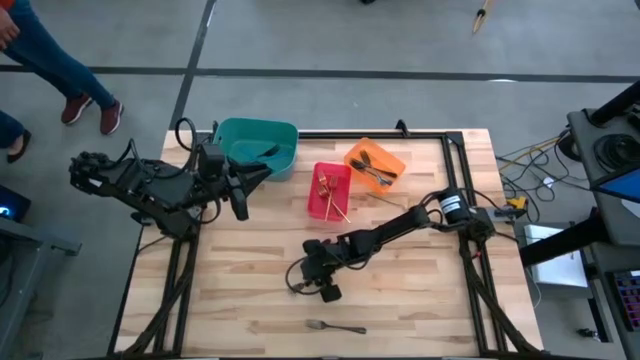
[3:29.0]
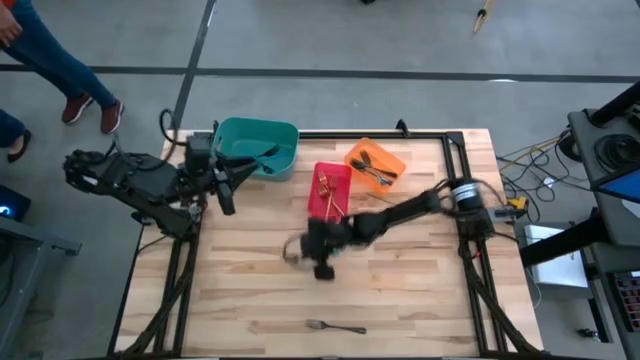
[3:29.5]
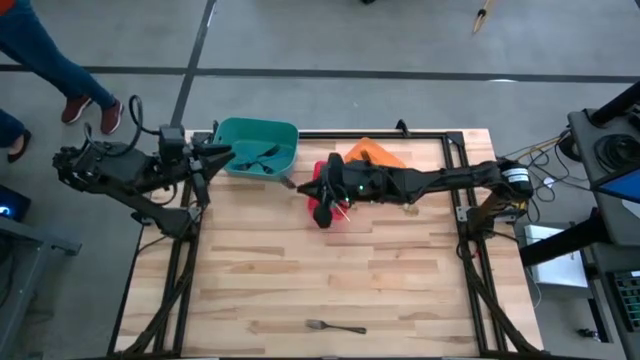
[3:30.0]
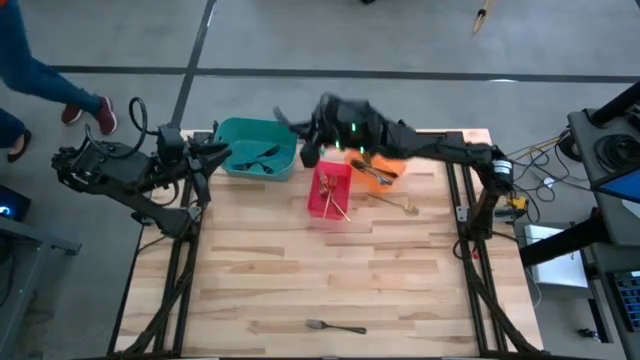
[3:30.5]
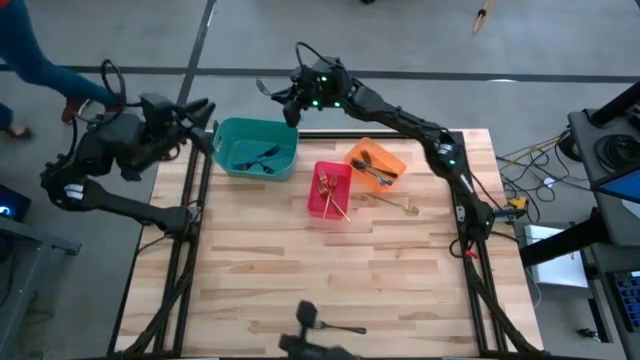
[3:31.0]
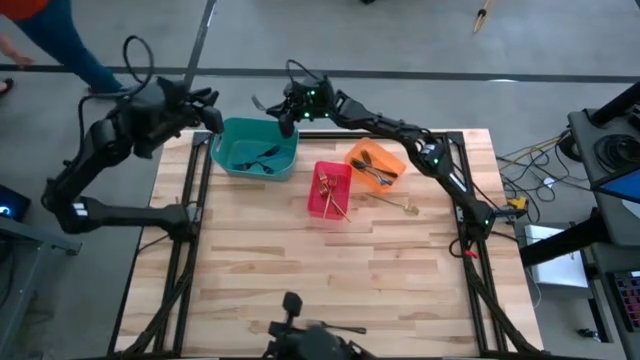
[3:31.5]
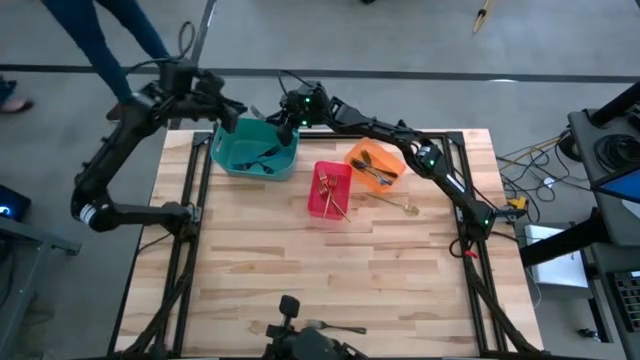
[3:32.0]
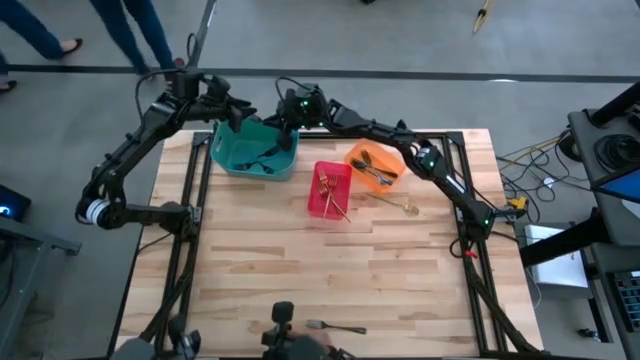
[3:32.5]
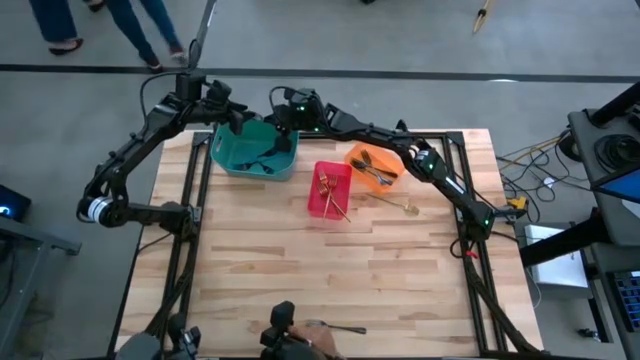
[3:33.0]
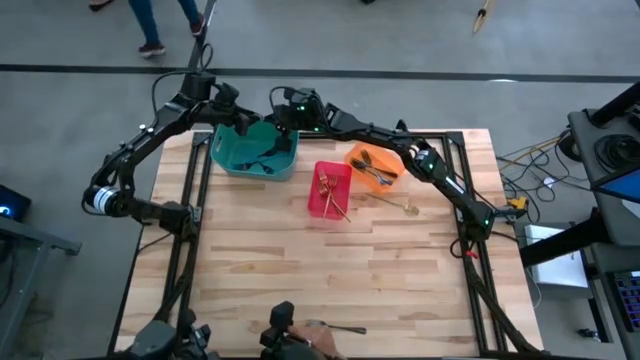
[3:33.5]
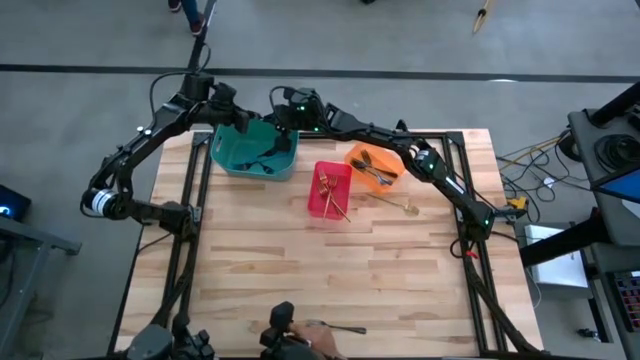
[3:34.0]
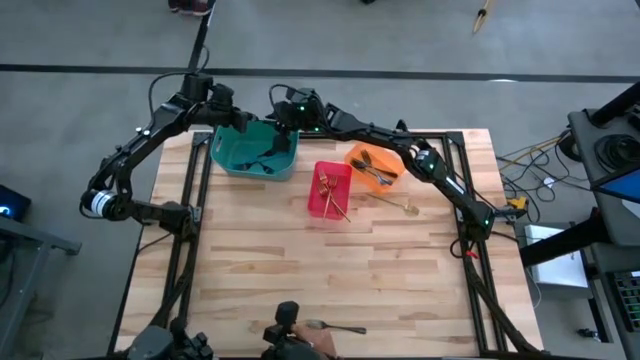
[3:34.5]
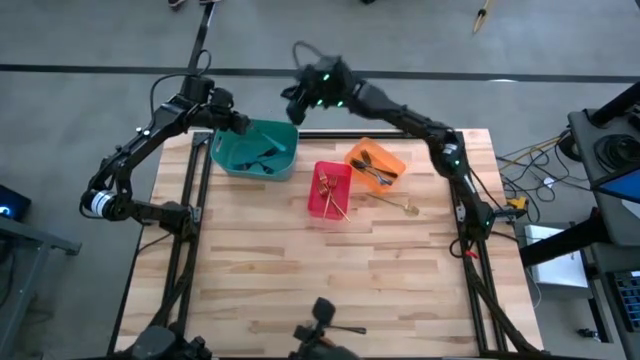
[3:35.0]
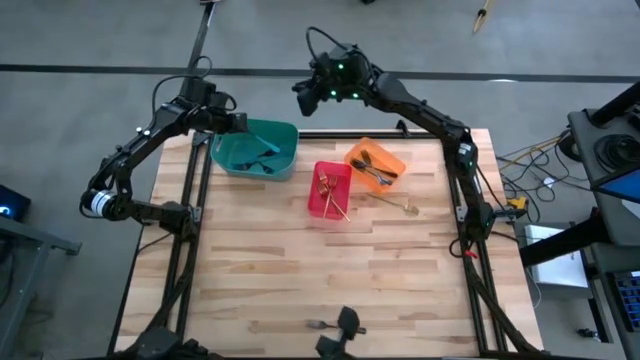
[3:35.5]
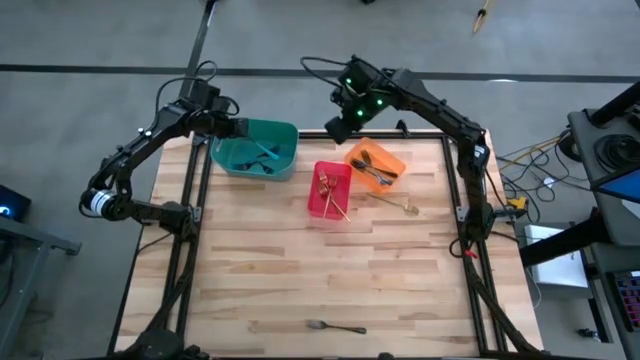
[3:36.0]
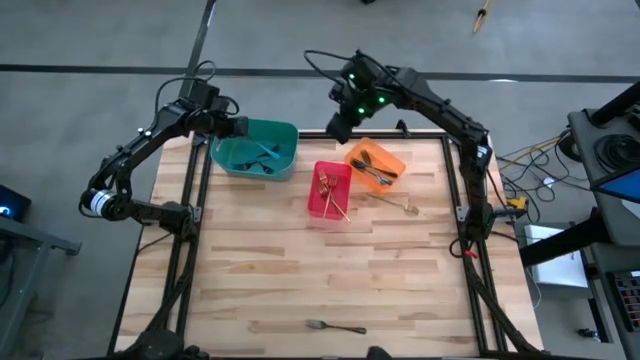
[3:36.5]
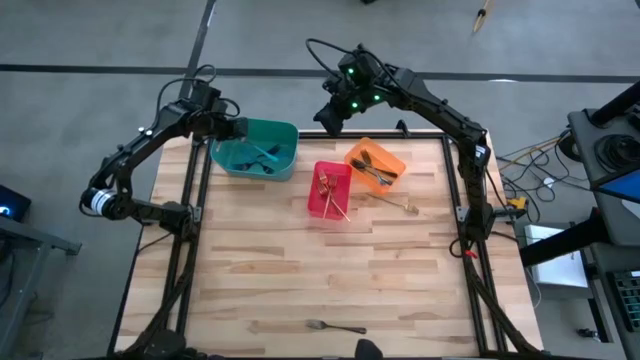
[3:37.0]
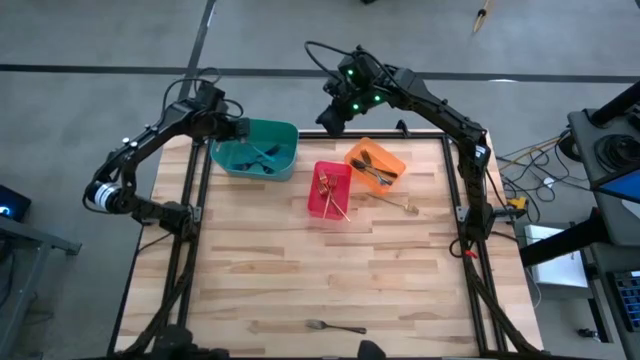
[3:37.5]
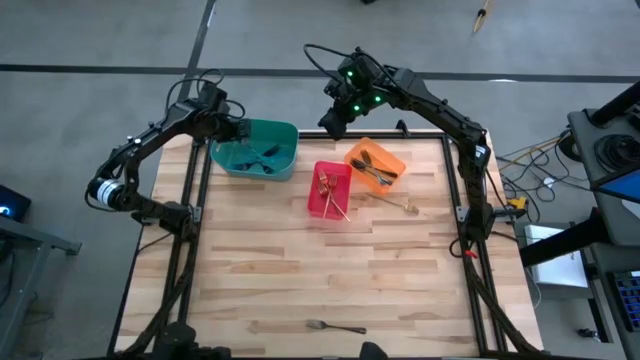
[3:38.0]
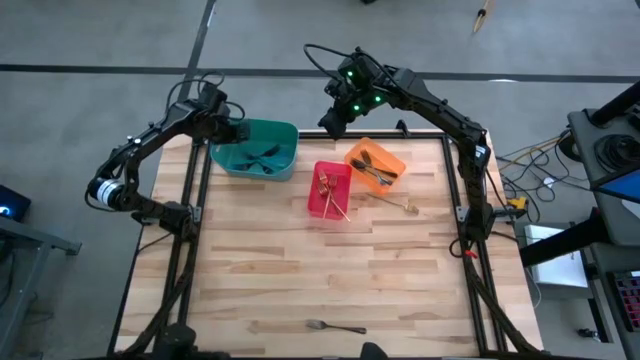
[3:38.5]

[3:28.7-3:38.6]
Task: Sort silverware by color (type)
Put the blue fork into the green bin

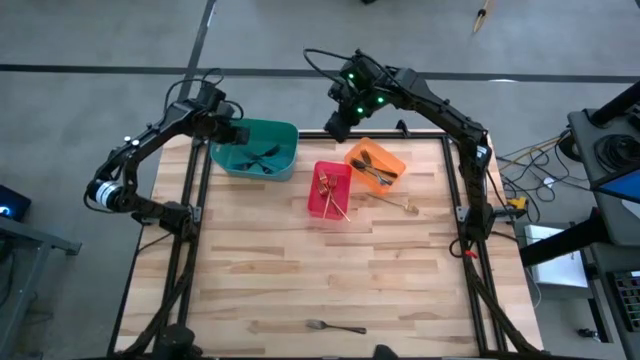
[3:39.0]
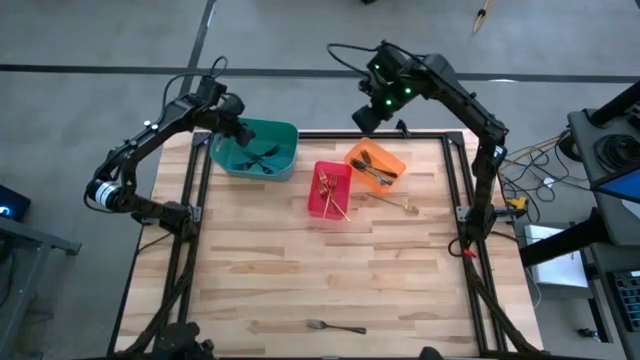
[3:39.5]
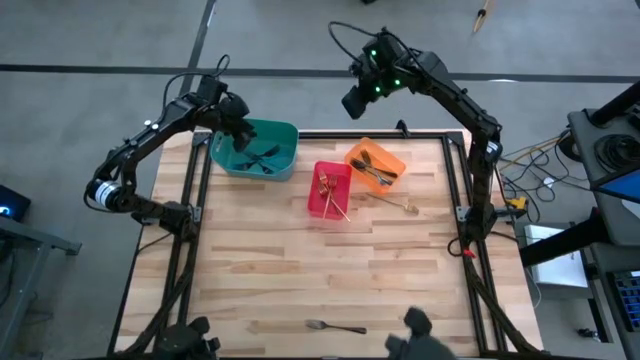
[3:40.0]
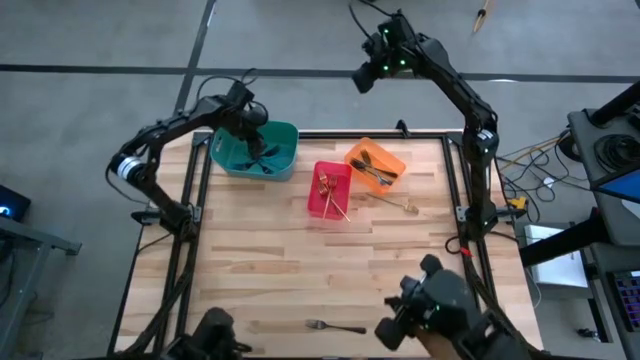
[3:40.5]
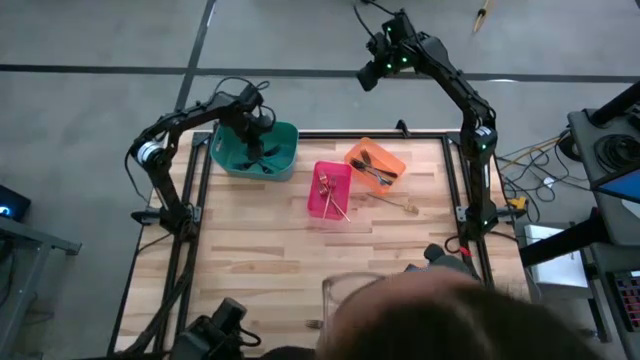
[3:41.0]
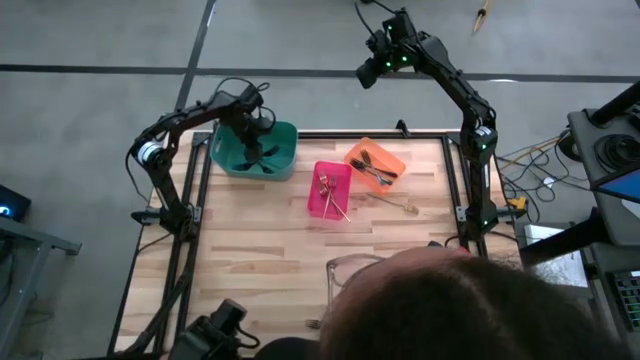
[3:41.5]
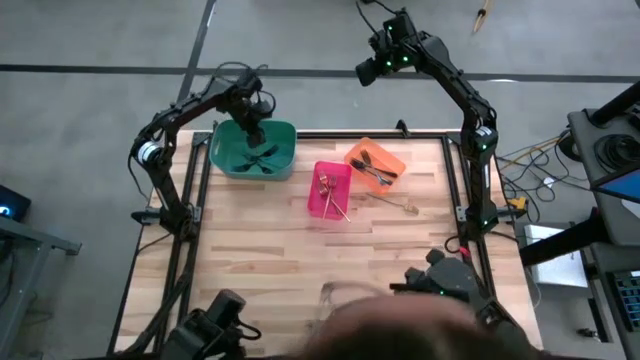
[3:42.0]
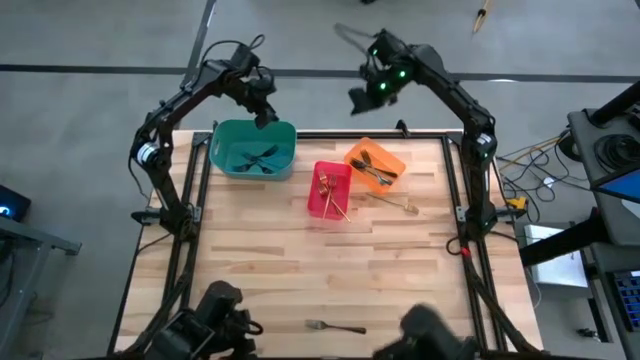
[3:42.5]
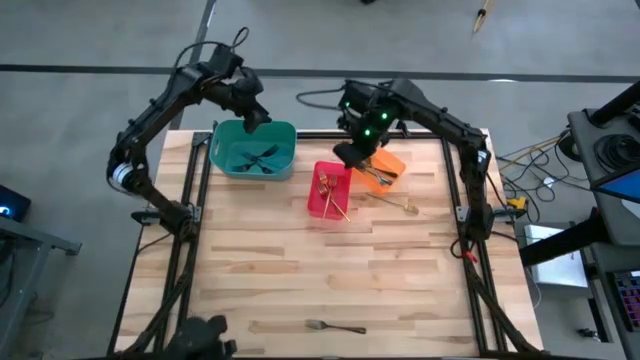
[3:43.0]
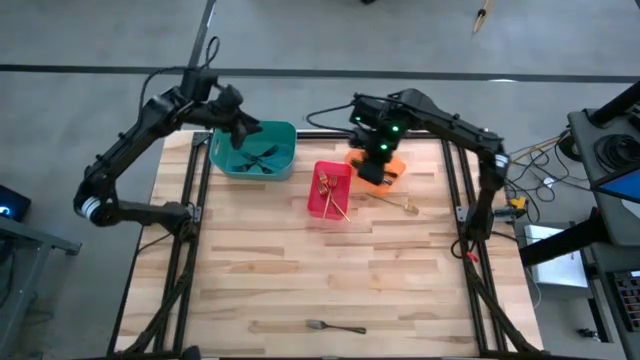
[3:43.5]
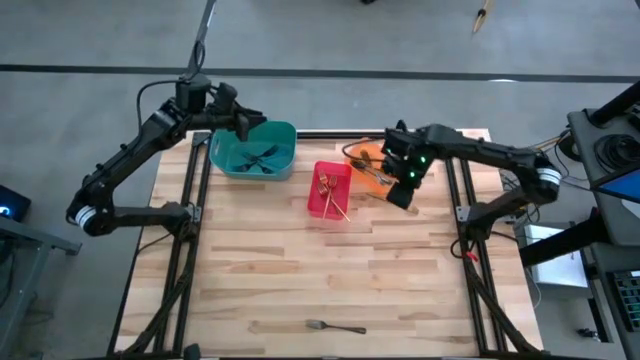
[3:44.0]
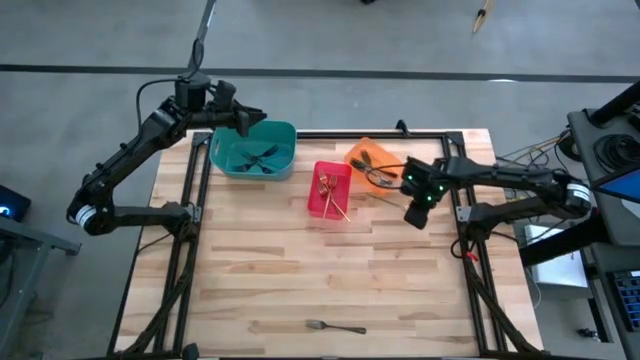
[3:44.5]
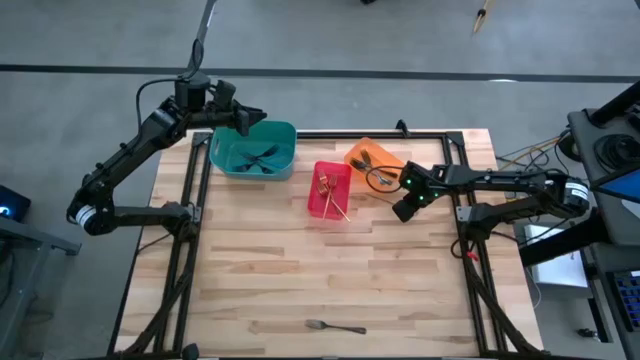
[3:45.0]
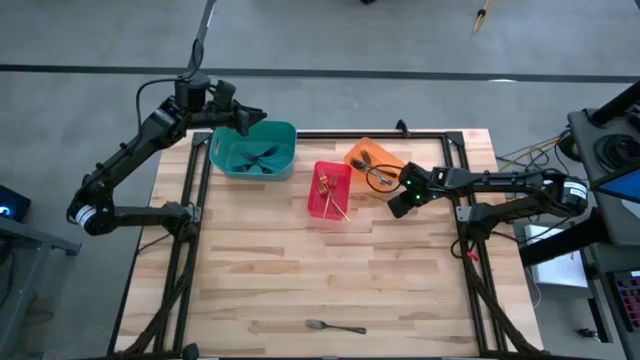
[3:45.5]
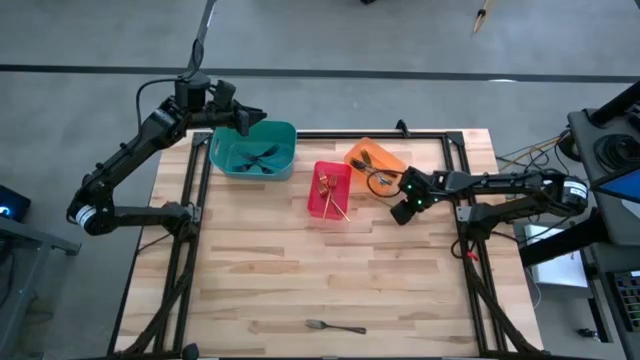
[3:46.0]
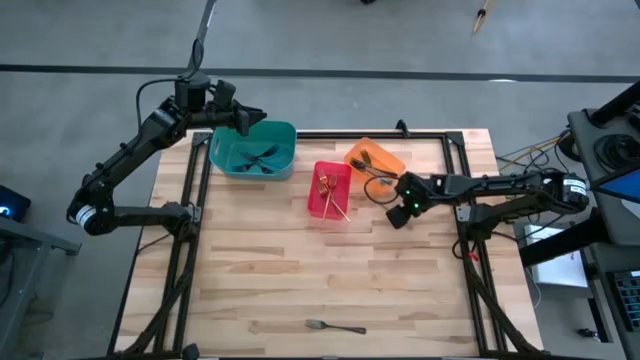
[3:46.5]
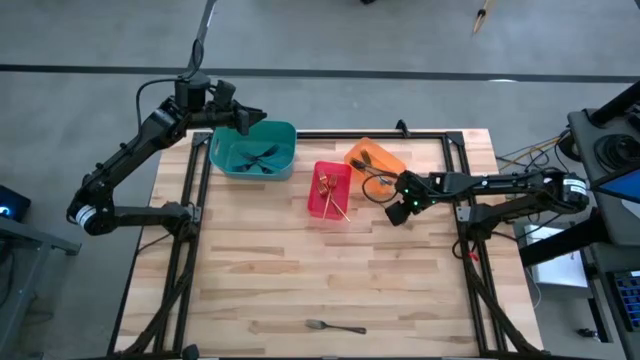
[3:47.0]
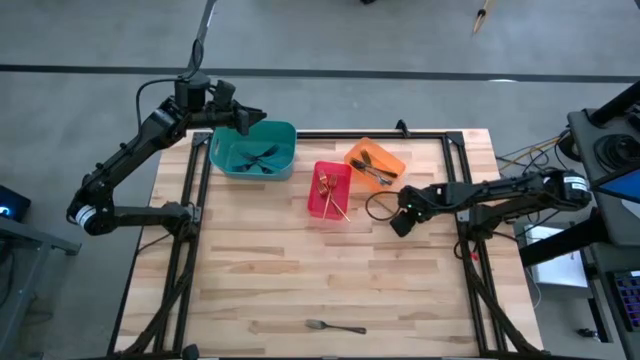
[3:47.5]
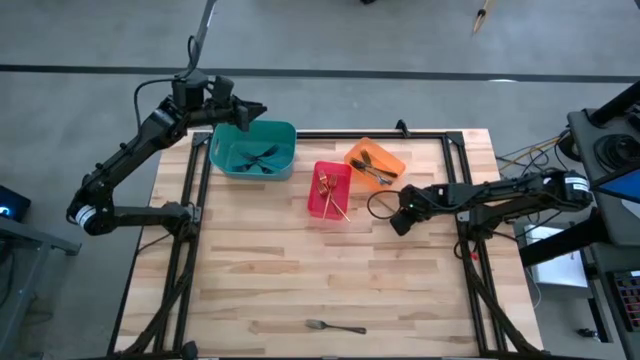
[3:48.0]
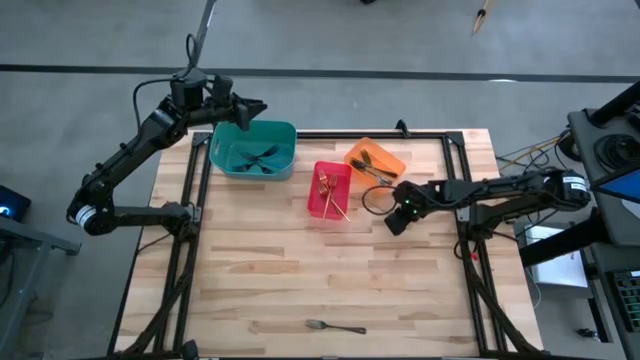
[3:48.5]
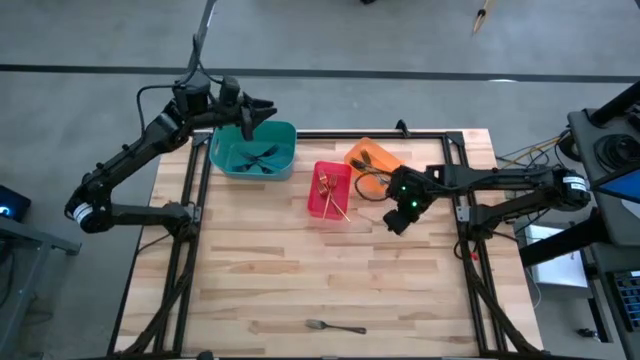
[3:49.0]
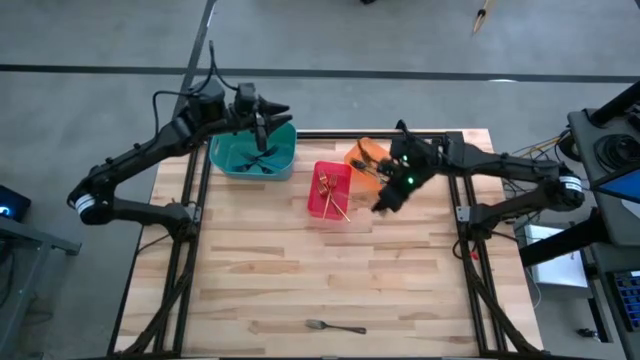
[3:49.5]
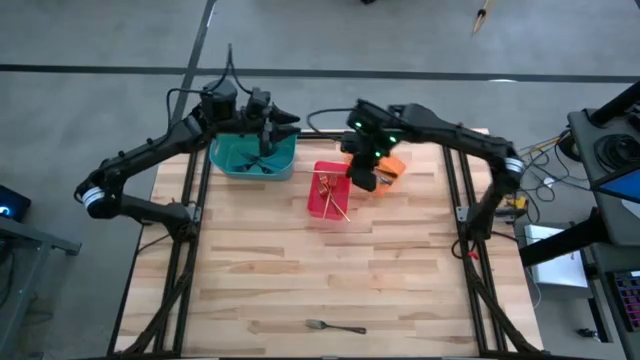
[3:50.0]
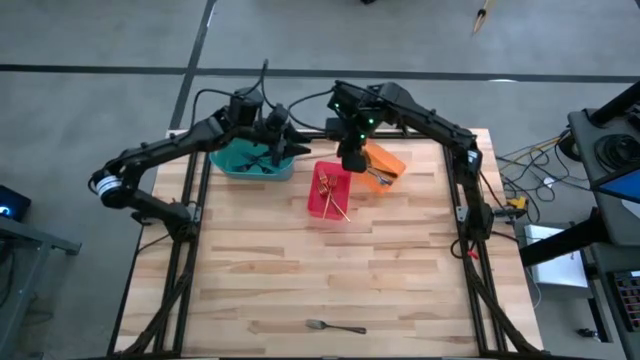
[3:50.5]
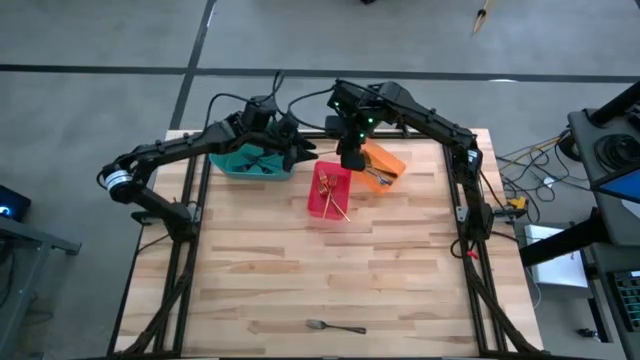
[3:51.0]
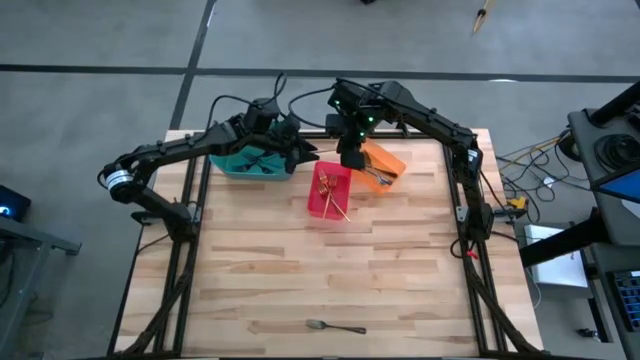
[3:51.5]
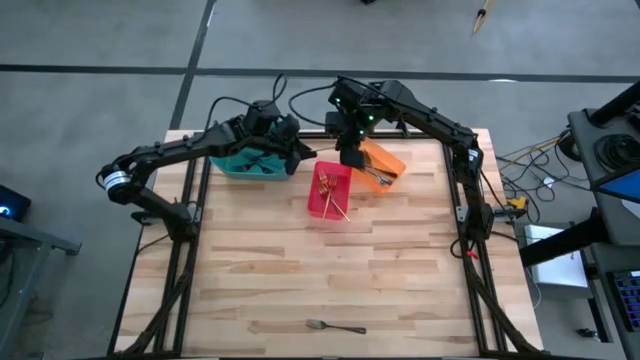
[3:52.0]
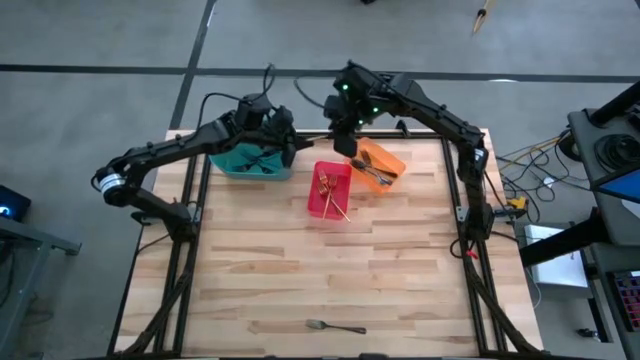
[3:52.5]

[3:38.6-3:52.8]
Put the golden fork into the red bin
